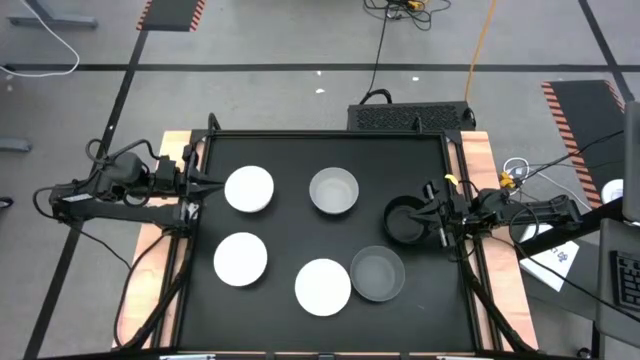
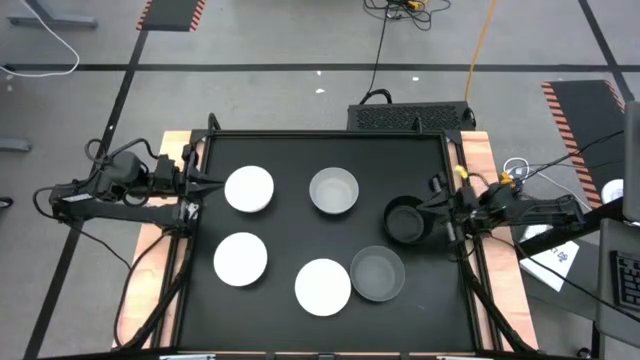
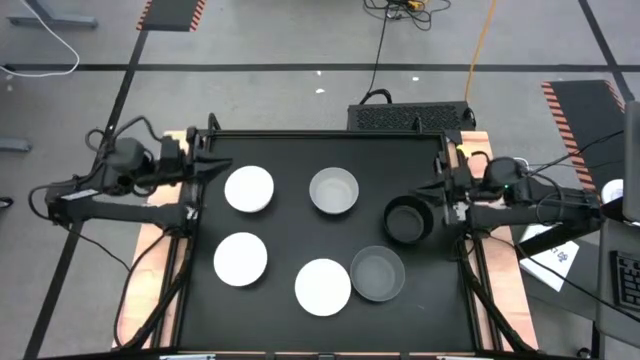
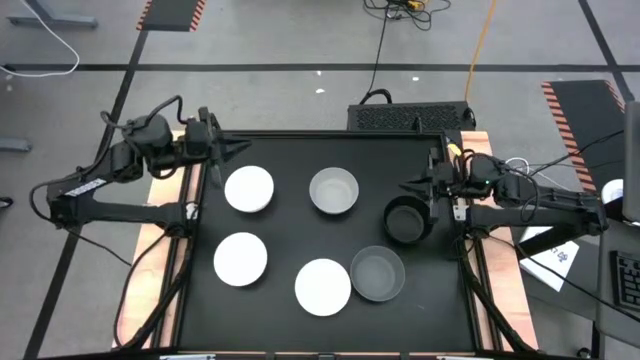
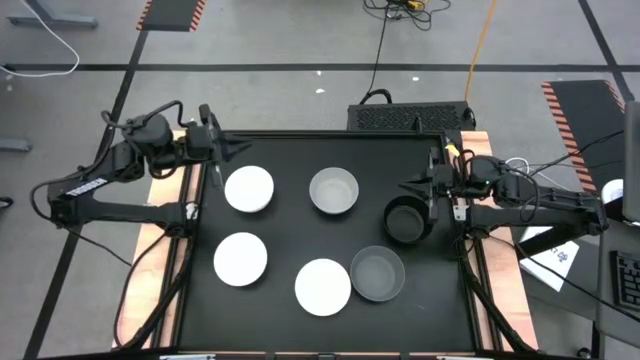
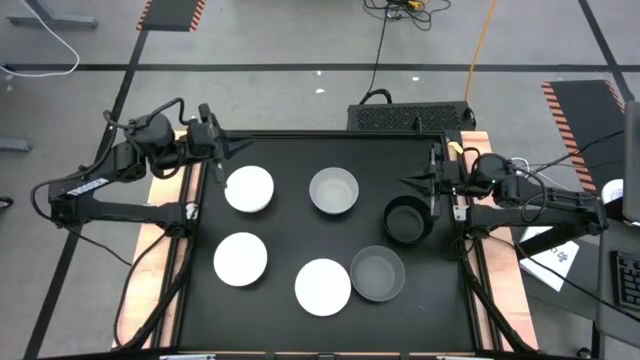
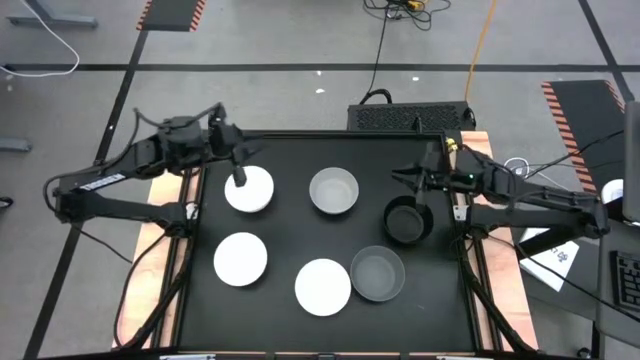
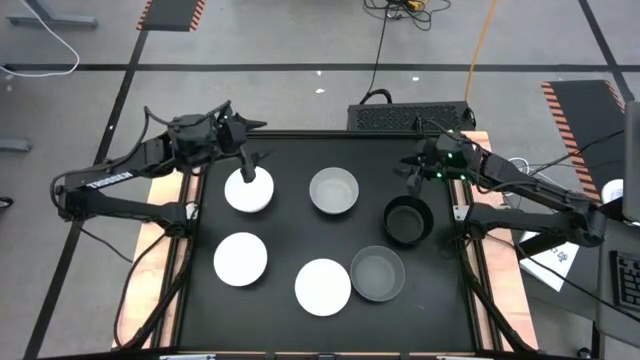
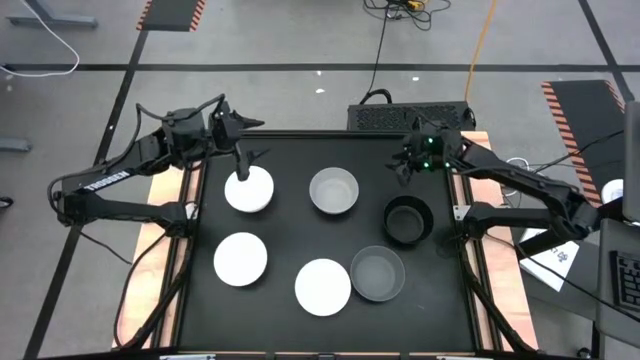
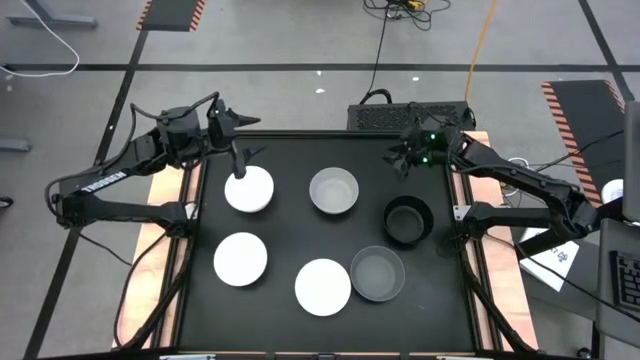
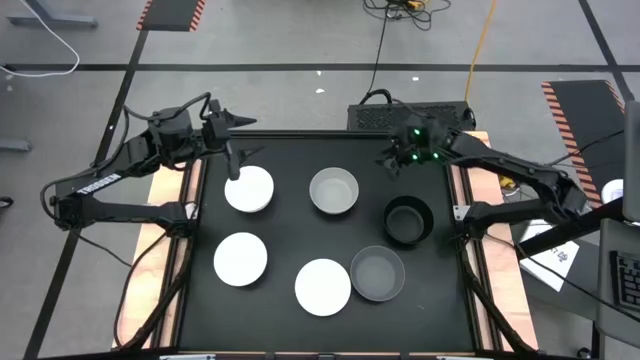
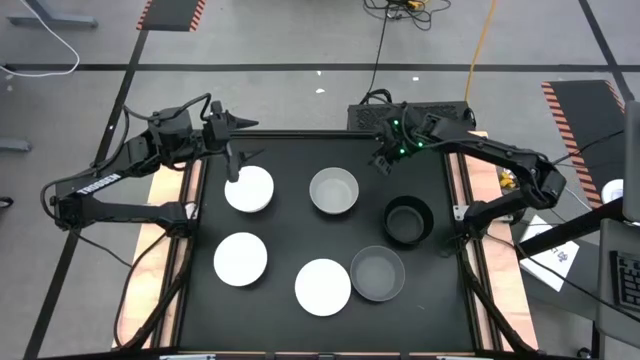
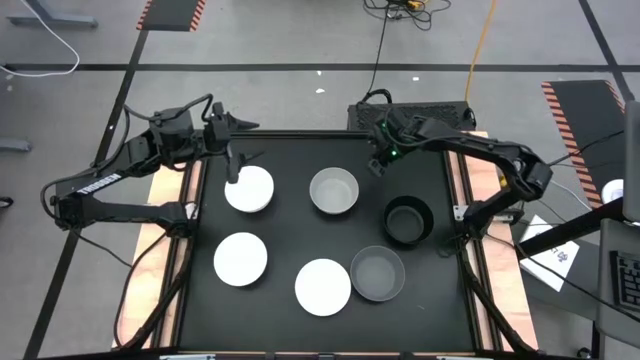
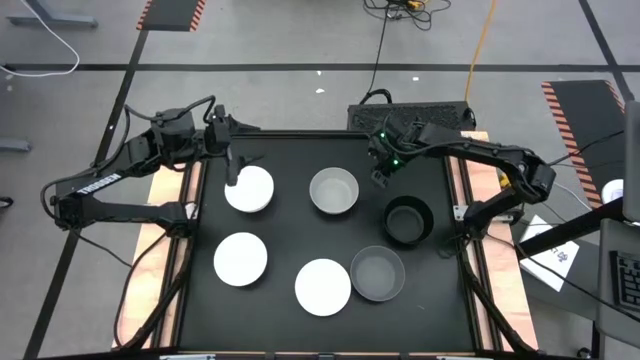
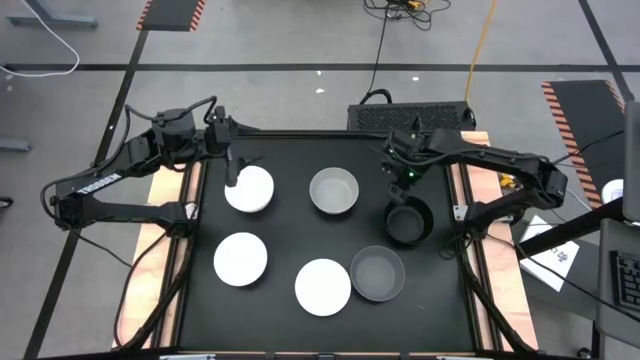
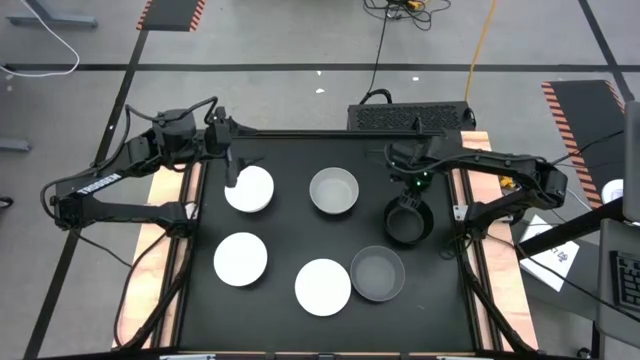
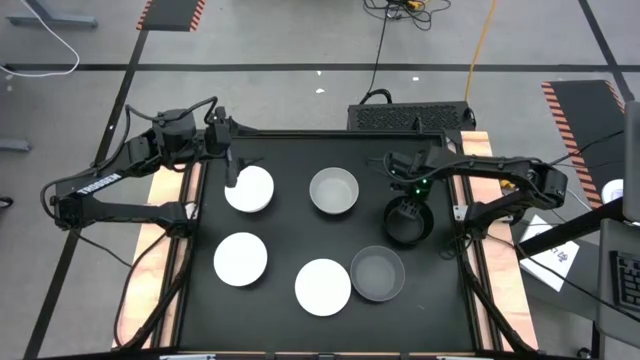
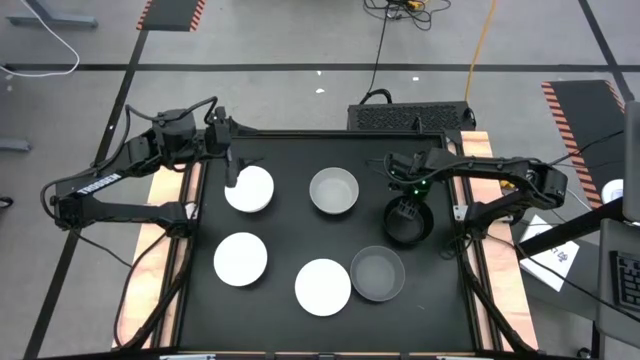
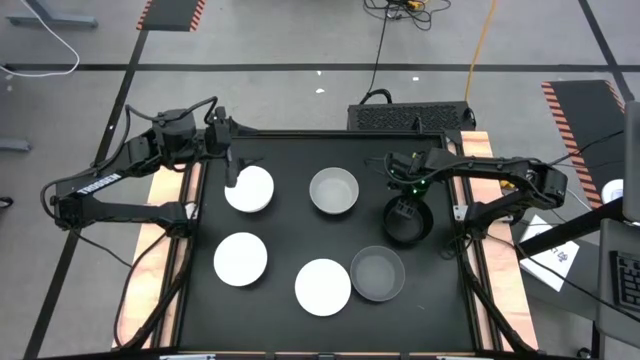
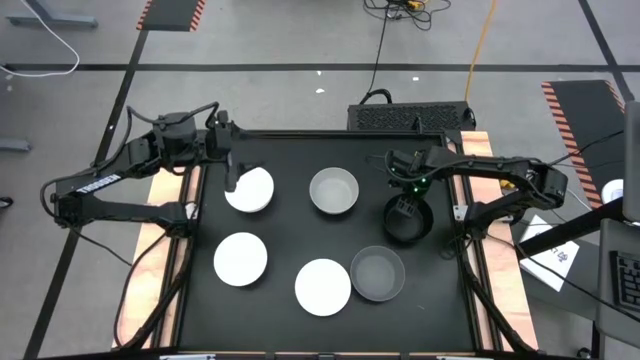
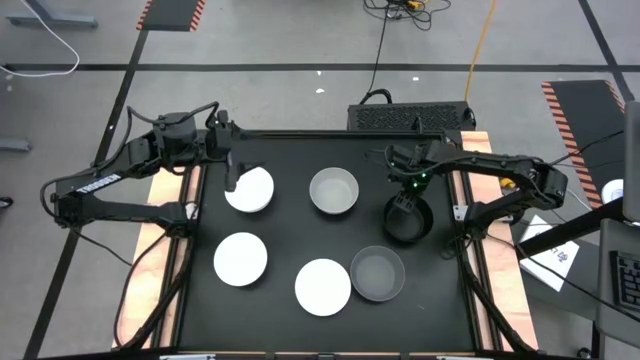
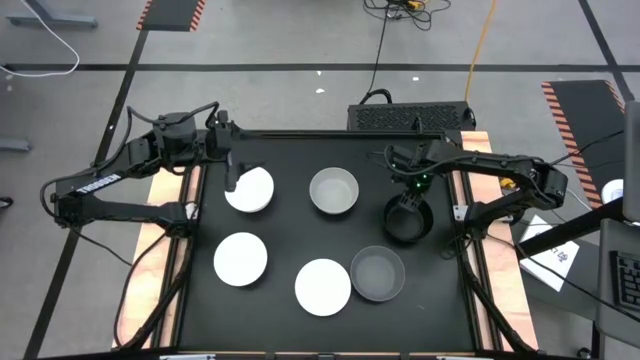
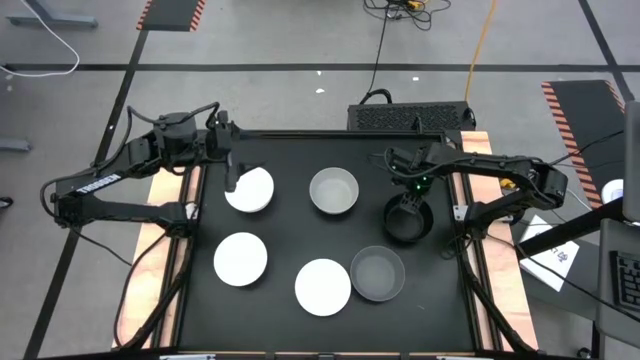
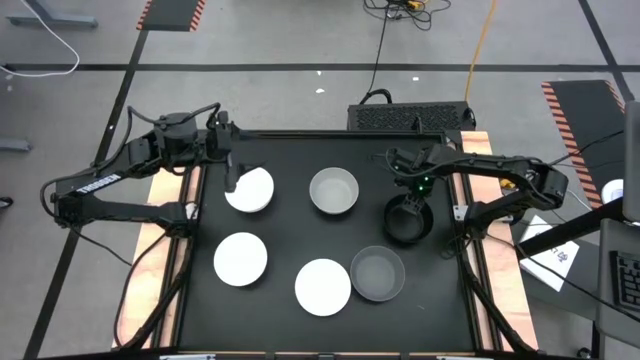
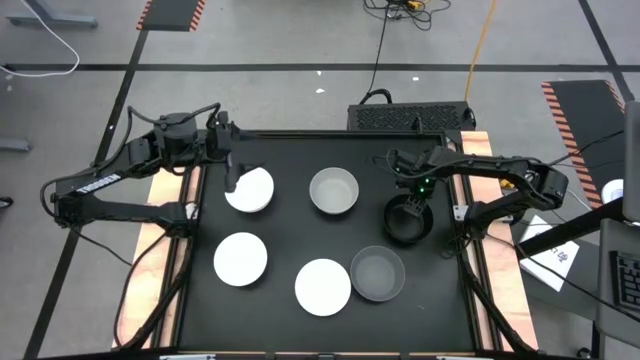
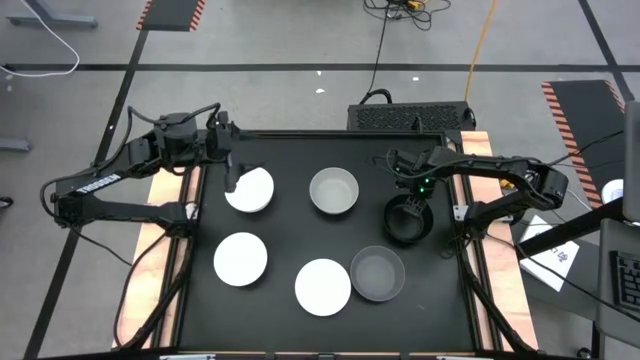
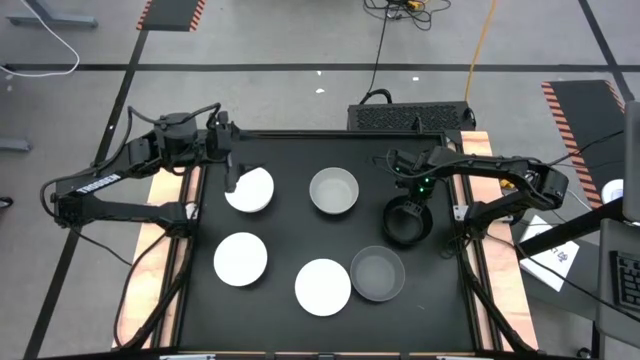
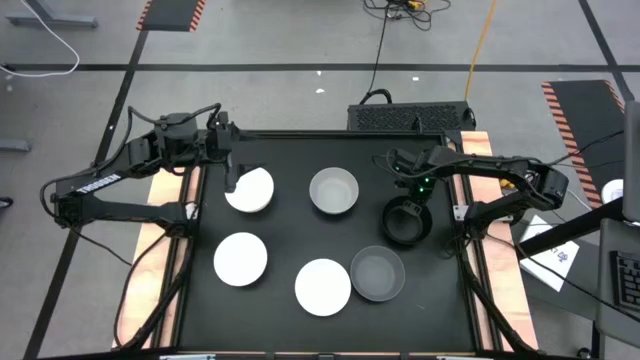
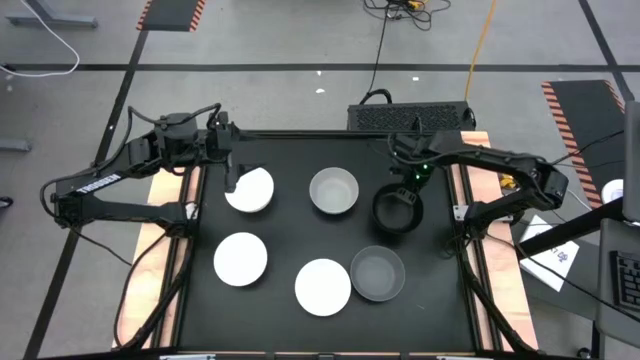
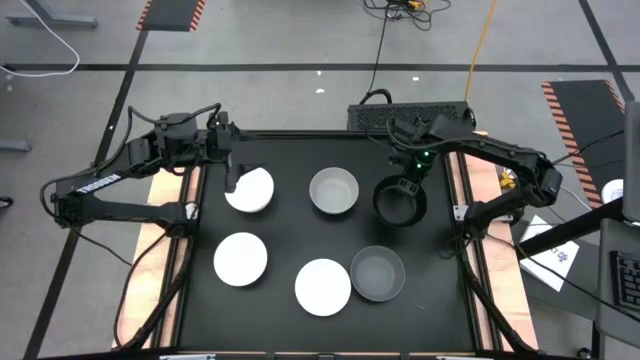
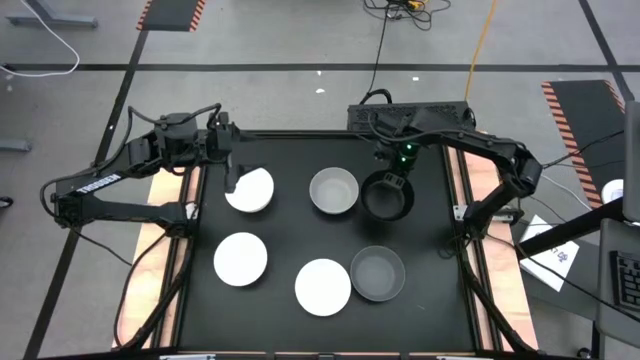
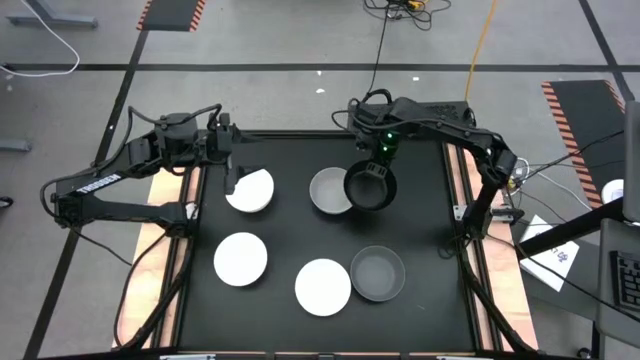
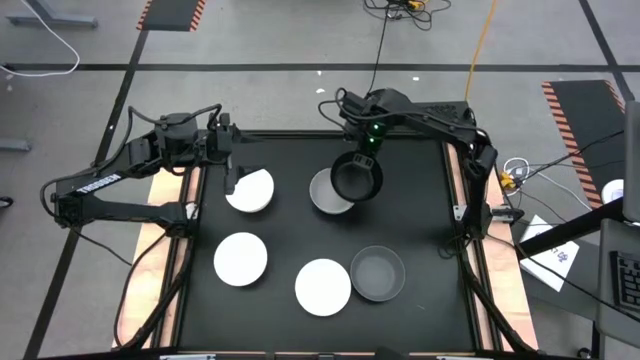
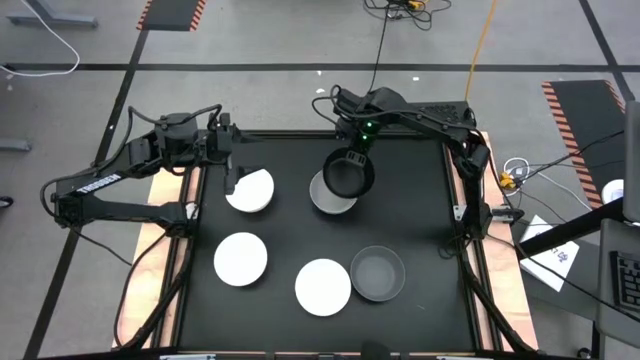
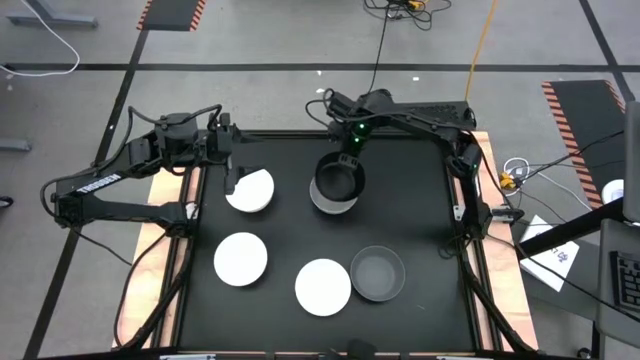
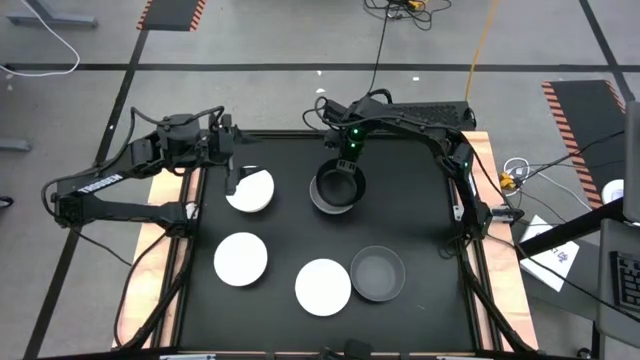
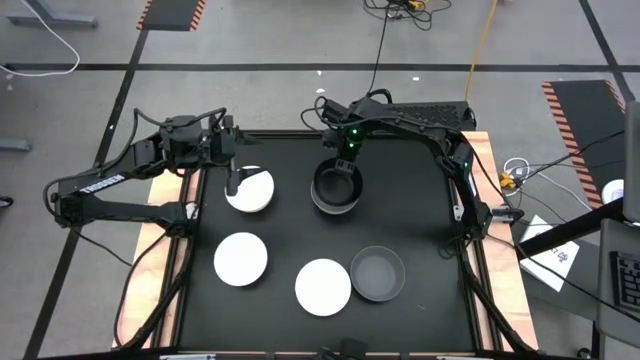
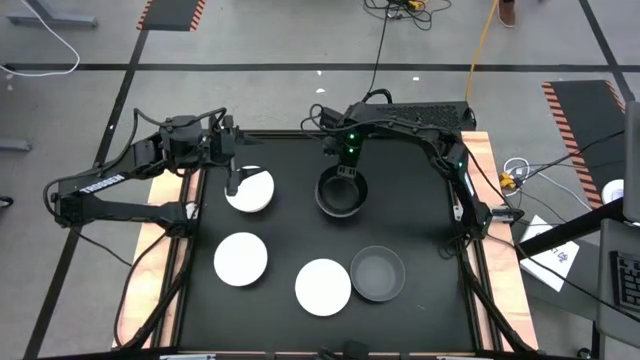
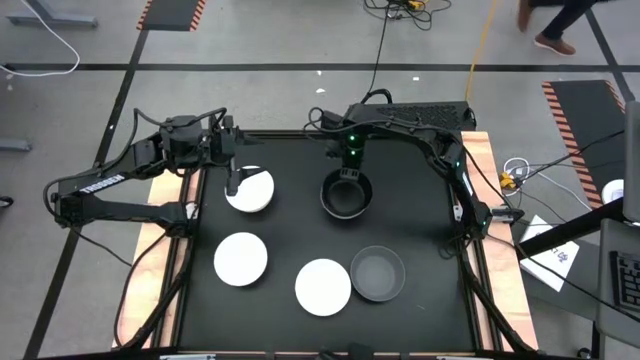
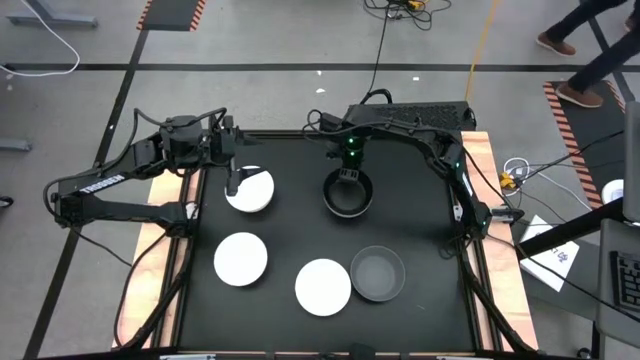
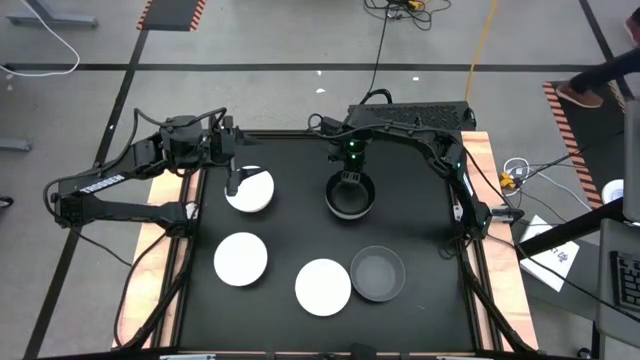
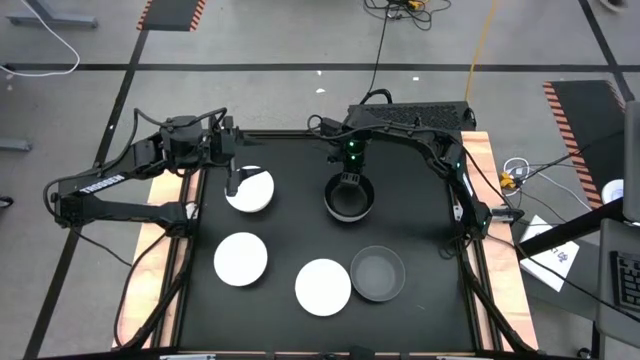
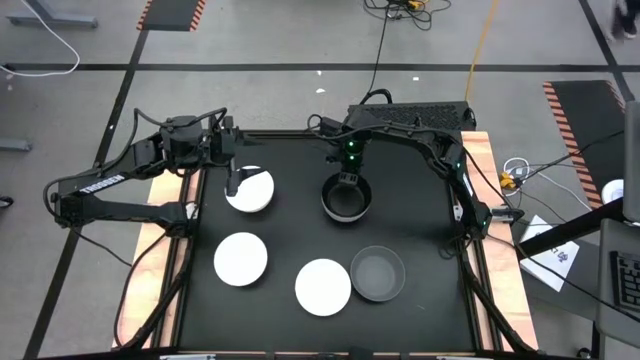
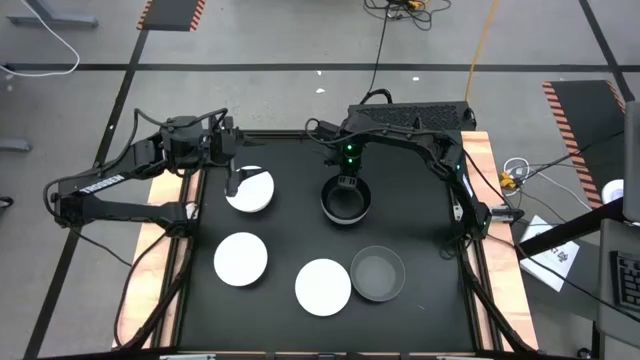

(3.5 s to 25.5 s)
Task: Nest bowls inside each other
Stack the black bowl on the light gray bowl
